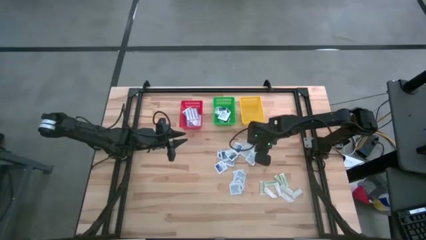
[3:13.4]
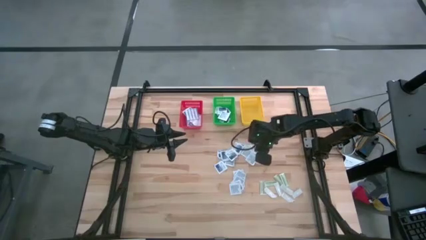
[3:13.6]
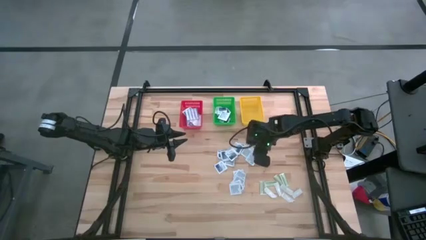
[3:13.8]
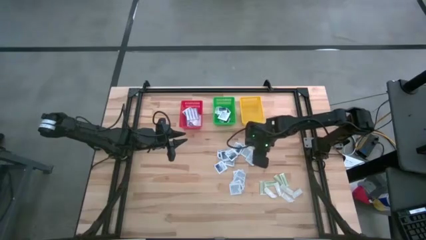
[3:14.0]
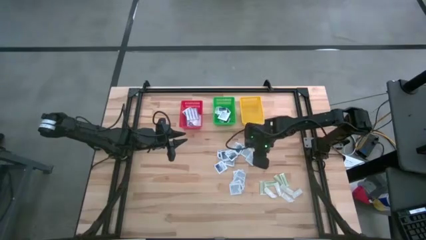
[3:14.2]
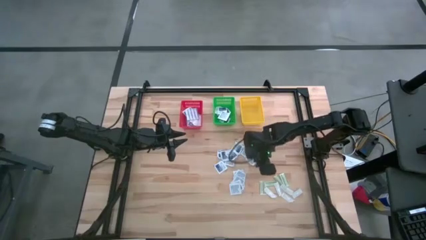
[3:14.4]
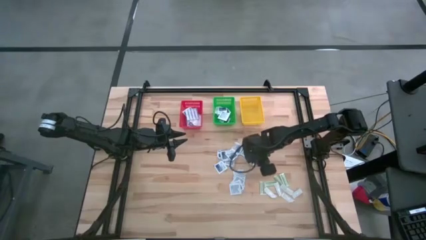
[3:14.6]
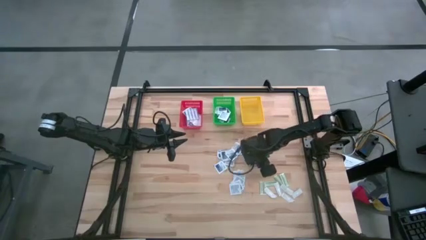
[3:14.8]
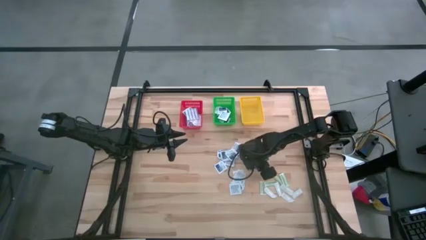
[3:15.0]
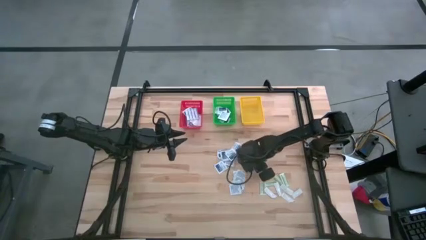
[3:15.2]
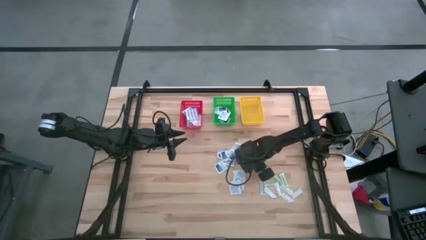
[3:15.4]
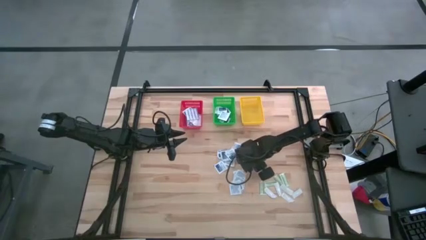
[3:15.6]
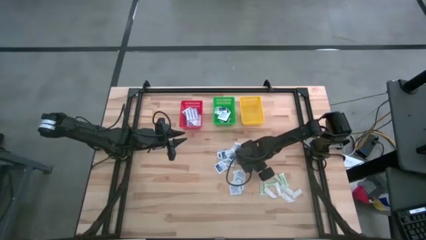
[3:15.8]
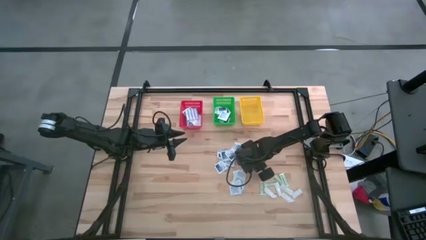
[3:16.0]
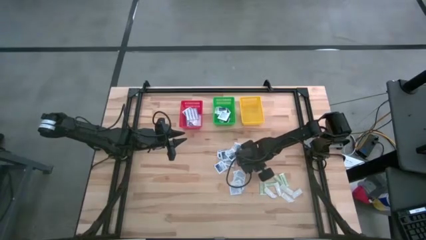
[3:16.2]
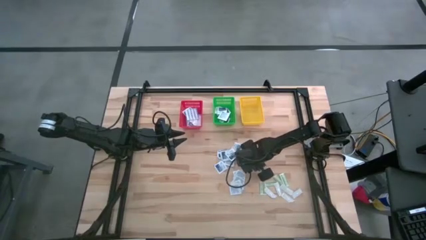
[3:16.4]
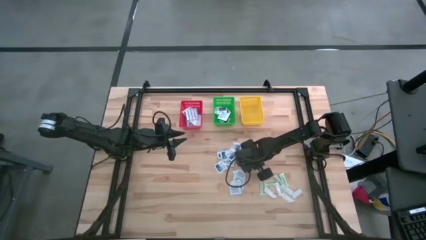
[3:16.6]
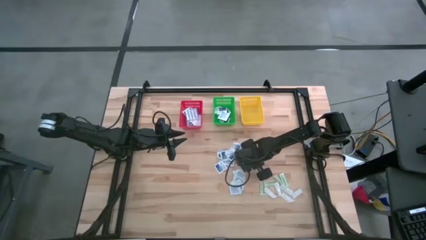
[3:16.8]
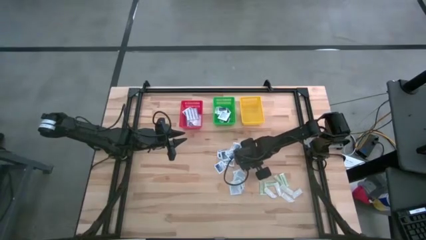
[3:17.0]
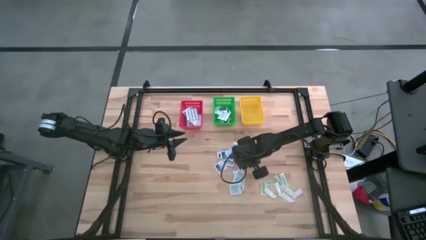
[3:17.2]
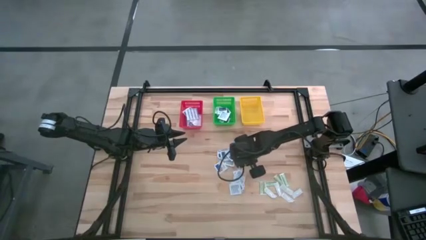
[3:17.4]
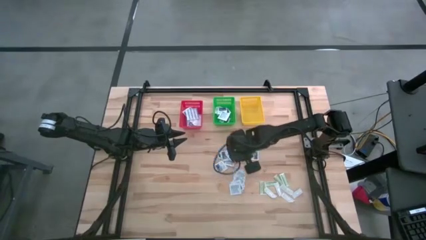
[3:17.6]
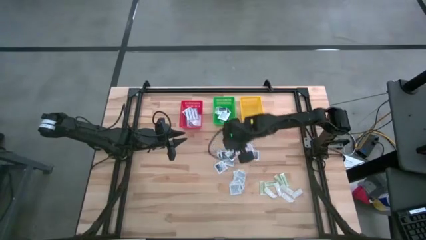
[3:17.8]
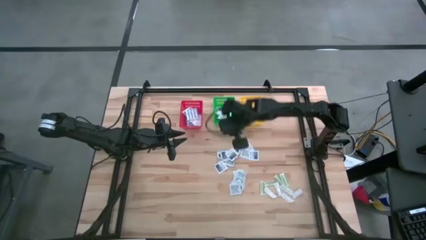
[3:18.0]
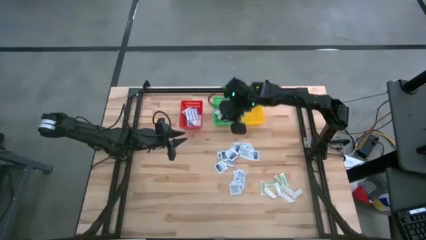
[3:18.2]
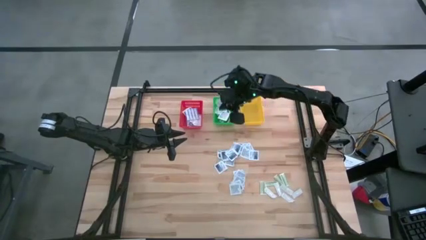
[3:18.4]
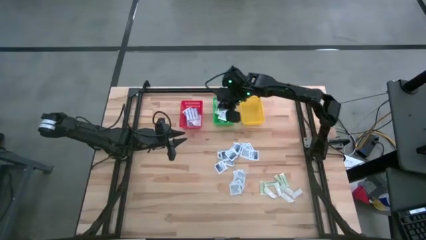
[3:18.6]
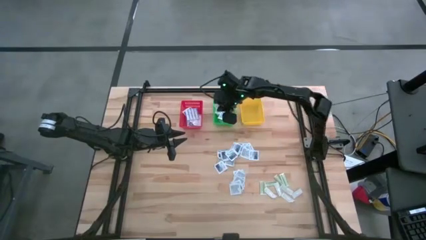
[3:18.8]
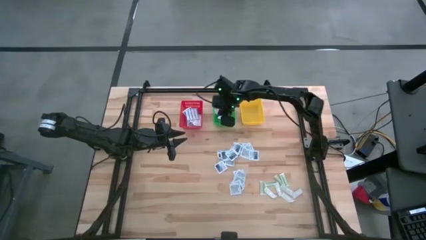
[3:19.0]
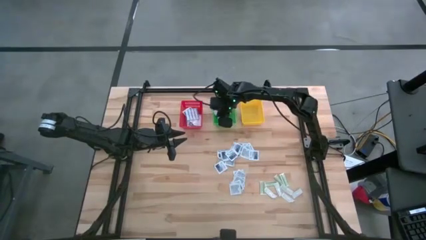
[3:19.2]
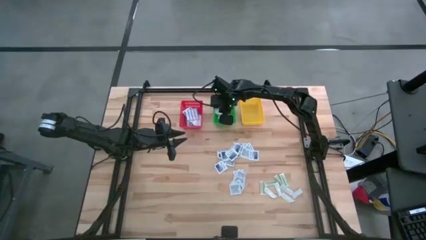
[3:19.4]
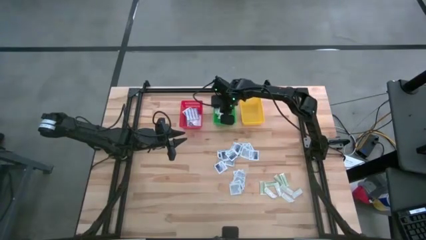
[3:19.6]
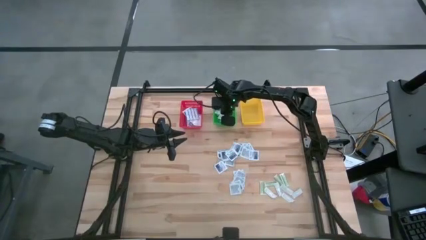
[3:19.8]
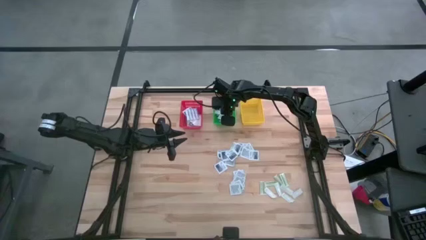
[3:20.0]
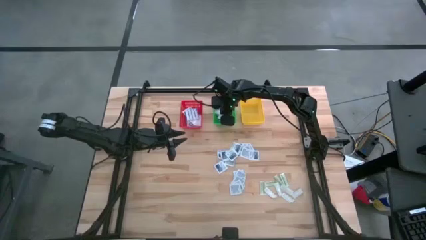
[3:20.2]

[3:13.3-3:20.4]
Task: Pick & Place First Aid Supplies
Put the alcohol pad into the green basket

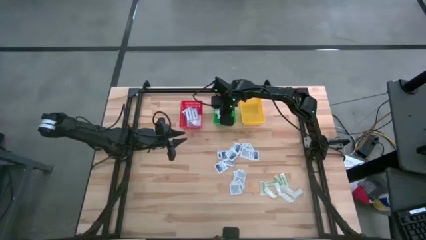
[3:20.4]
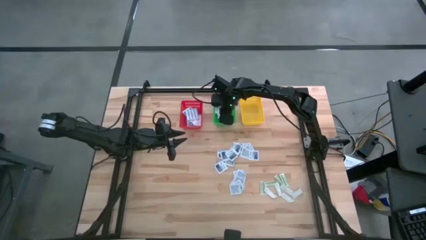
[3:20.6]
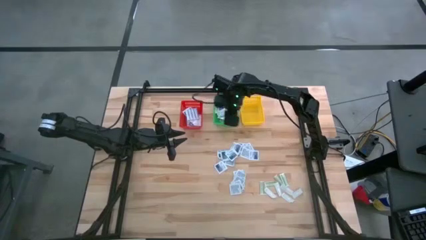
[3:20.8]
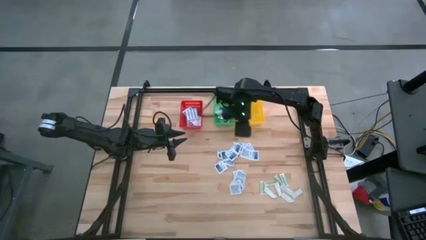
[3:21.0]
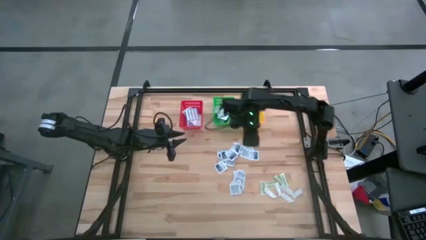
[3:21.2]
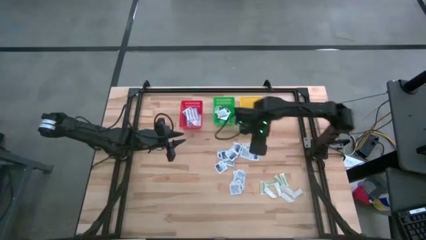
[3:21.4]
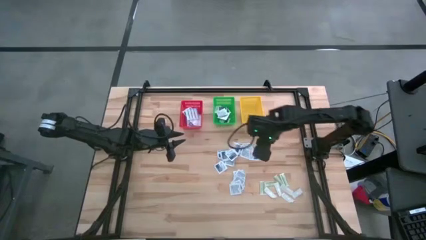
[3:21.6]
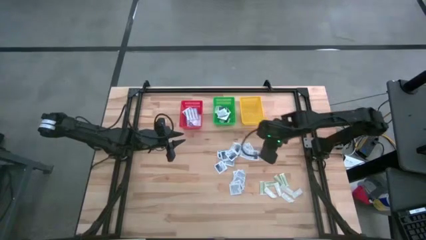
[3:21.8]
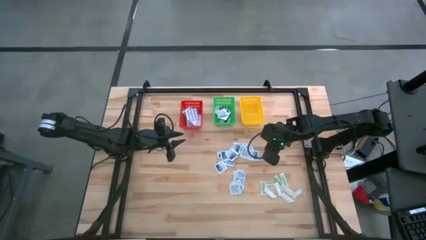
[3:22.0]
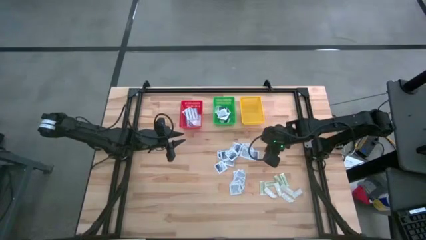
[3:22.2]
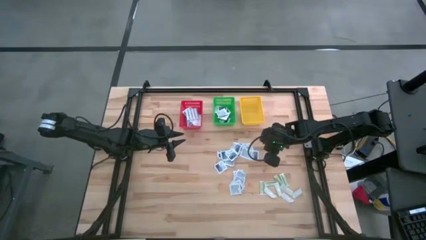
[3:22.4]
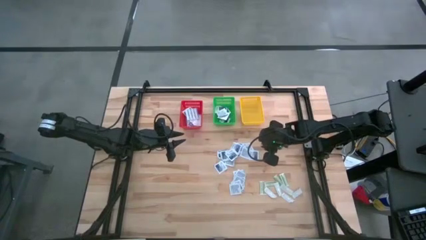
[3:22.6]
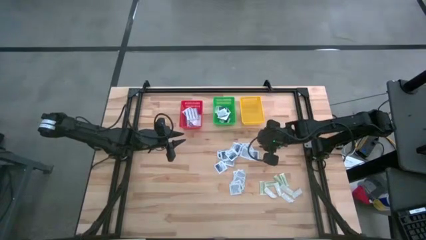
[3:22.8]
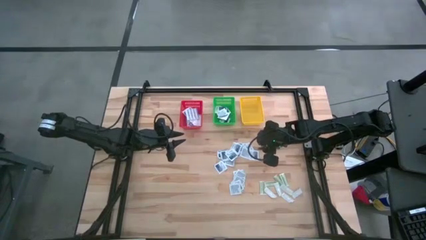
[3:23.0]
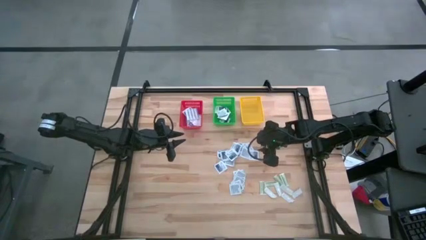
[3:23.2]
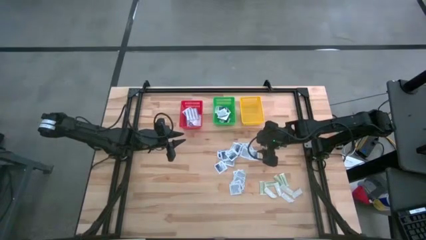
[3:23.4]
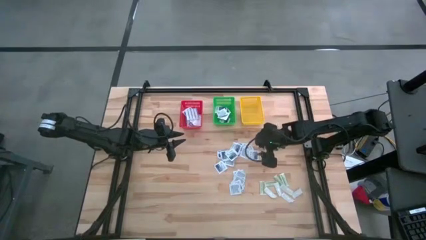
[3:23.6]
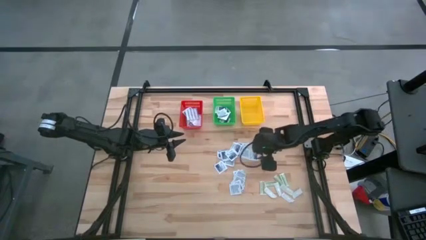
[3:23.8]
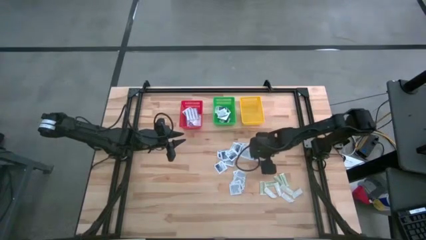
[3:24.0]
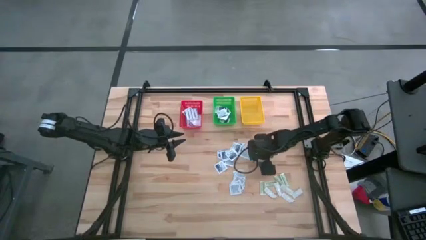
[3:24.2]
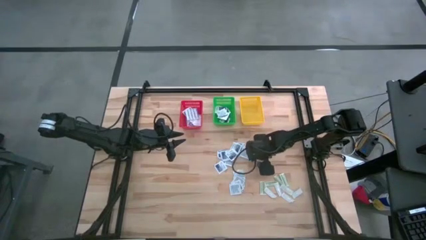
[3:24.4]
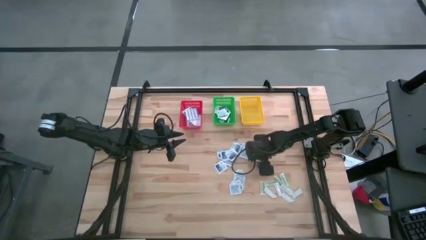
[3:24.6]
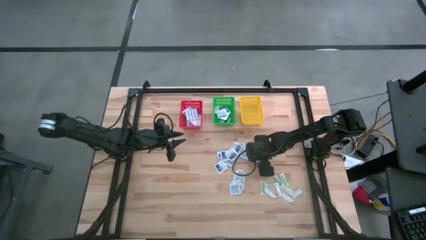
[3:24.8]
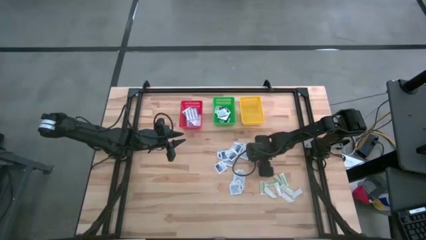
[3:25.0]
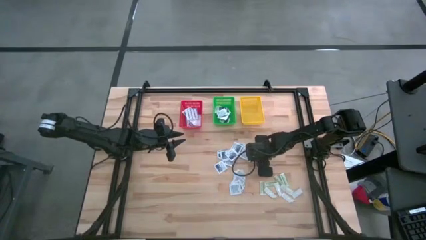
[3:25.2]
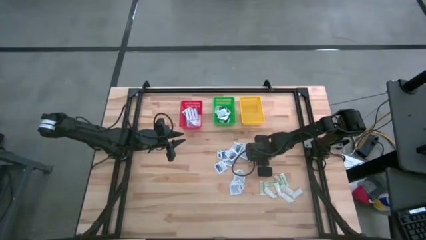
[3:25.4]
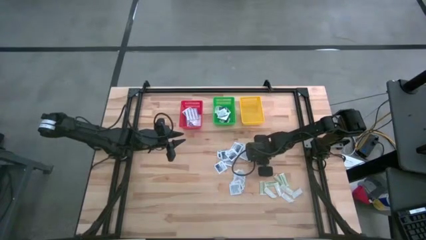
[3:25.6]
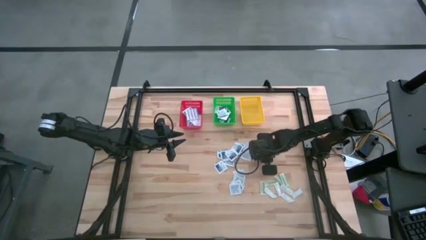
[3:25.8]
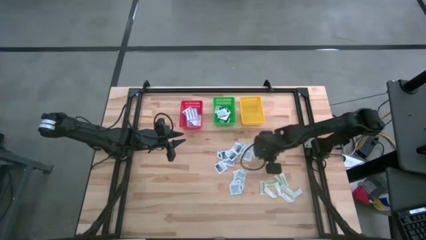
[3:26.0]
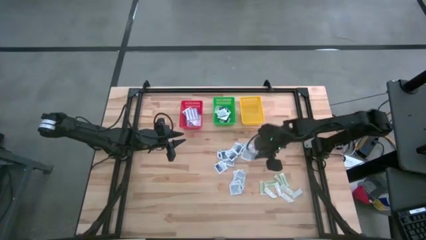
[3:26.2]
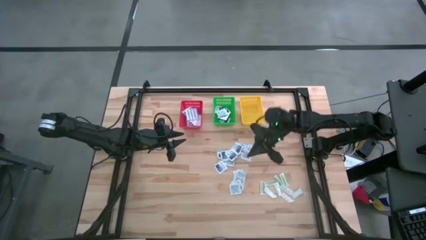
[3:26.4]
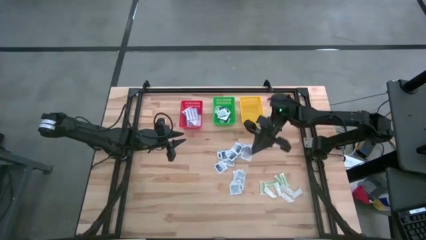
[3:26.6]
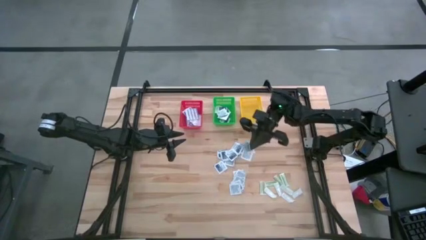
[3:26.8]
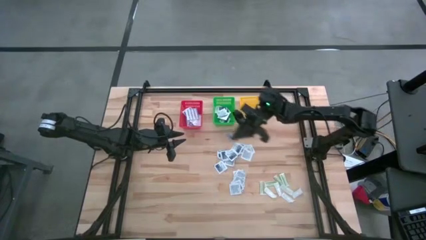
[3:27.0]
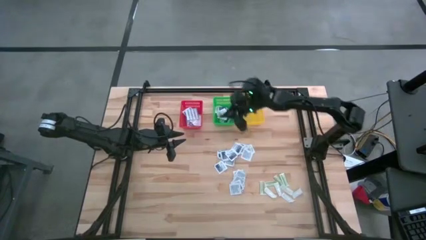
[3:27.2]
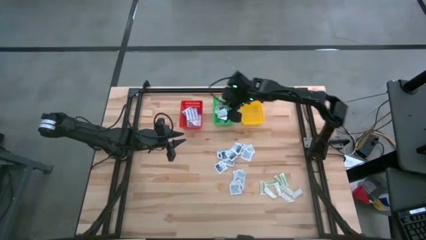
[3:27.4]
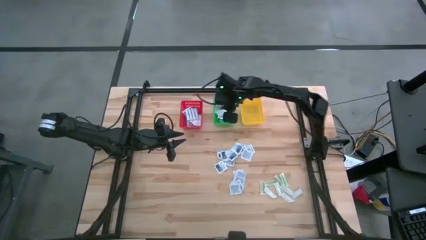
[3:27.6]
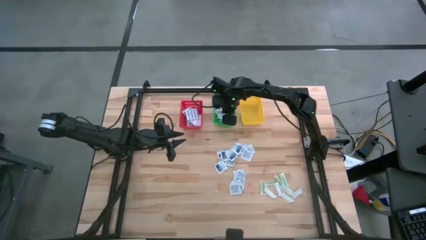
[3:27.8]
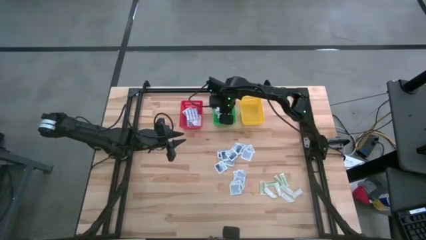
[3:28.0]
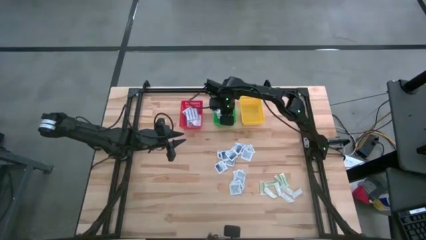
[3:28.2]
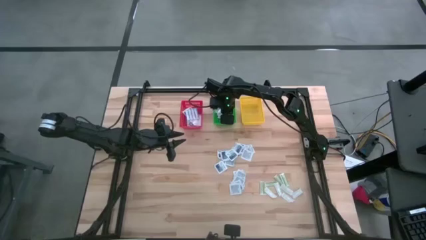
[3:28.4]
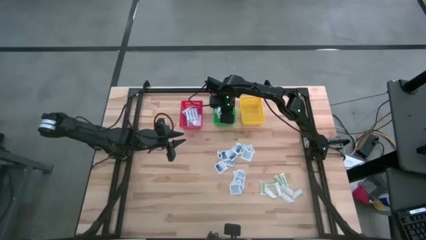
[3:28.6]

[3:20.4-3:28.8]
Put the alcohol pad into the green basket
